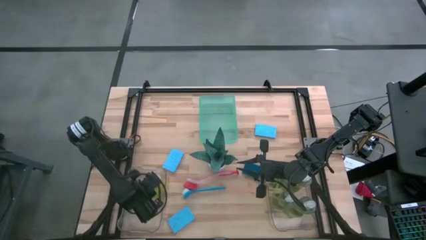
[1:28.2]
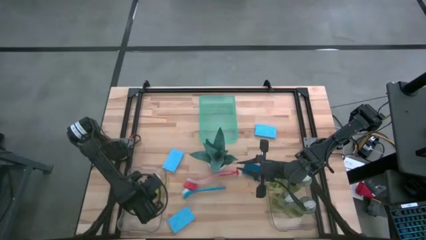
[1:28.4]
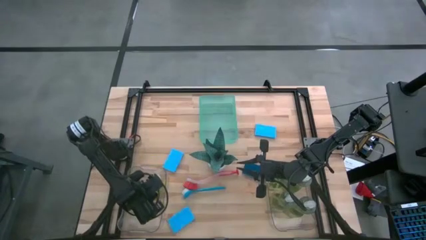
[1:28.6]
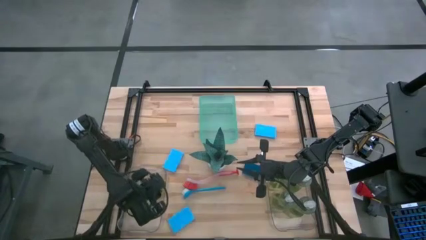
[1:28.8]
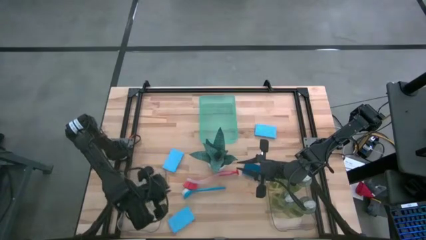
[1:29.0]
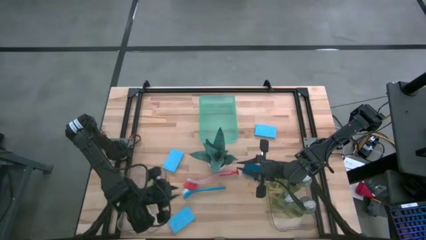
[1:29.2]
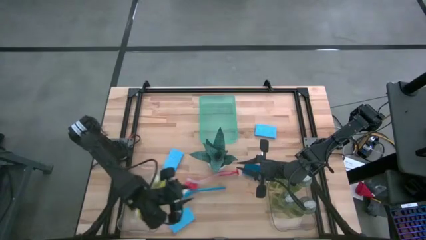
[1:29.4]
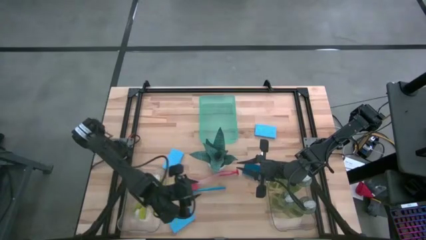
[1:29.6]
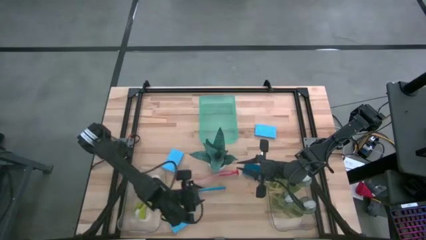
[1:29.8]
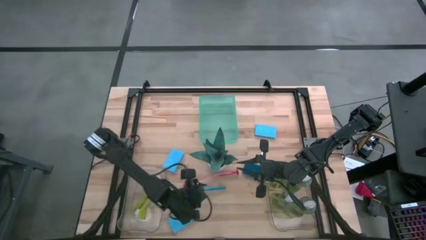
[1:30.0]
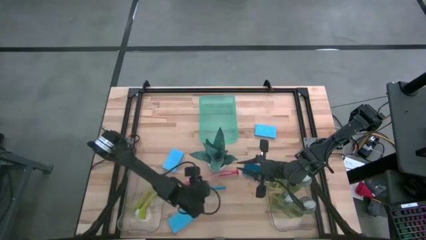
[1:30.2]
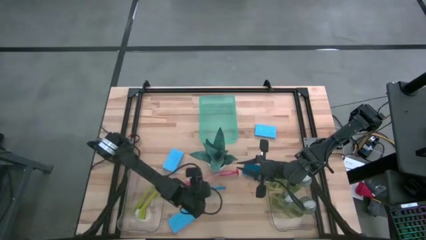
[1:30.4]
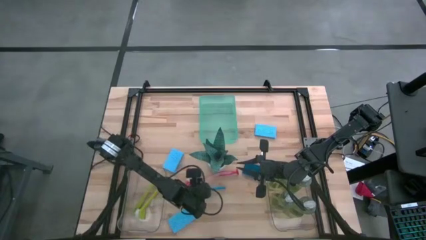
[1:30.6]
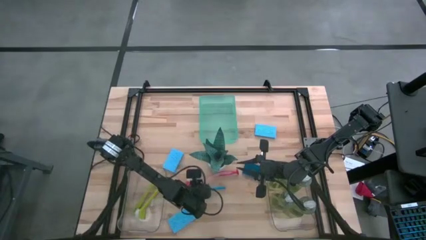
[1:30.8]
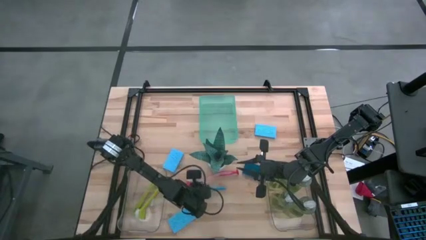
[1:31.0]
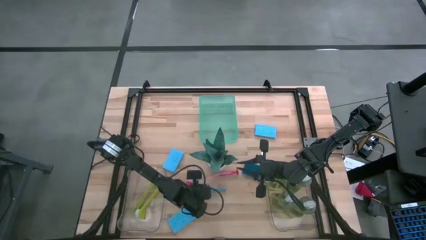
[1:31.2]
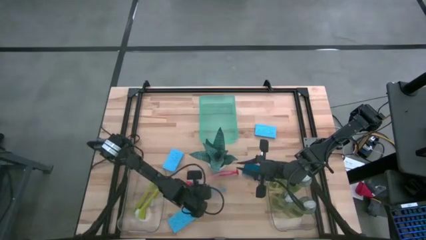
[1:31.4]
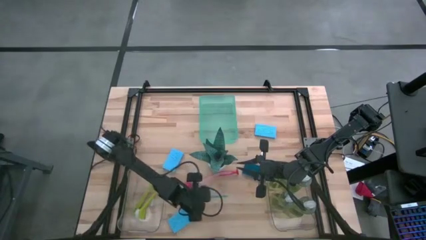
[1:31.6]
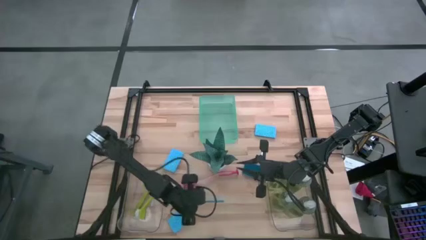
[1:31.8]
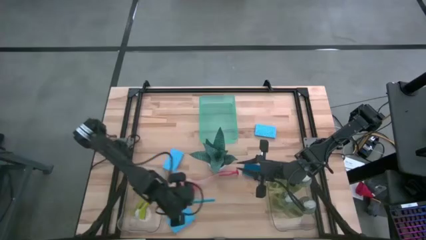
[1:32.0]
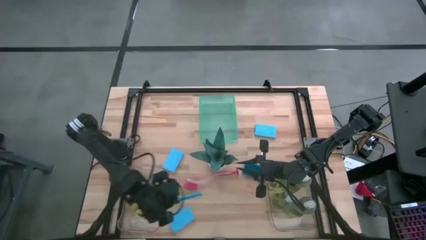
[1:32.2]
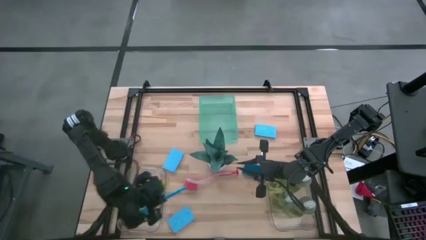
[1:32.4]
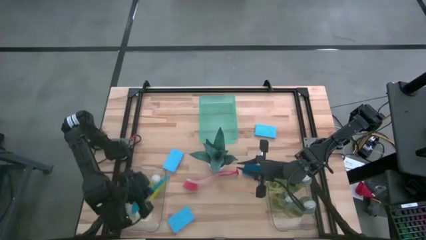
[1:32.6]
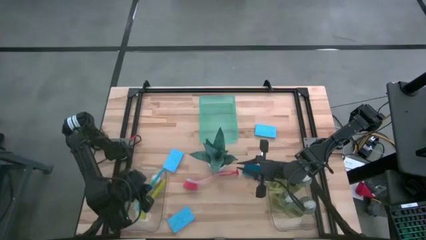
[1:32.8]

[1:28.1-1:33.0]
Task: Pick & Place Kitchen Sink Supplies
Put the blue dish brush into the left transparent bin

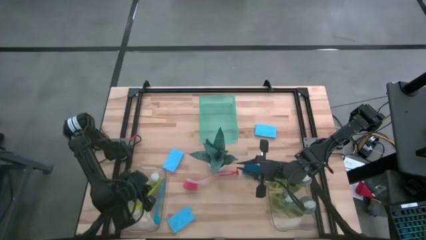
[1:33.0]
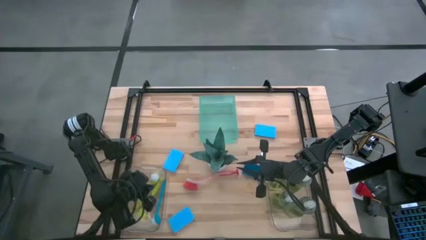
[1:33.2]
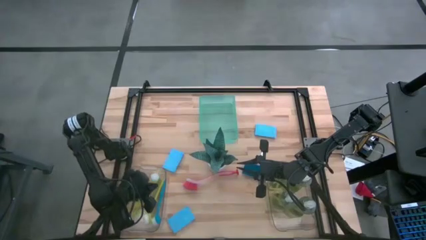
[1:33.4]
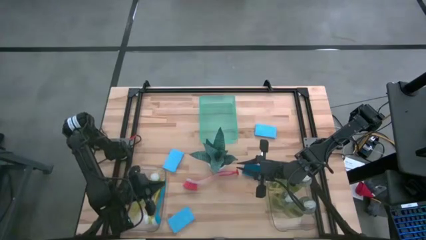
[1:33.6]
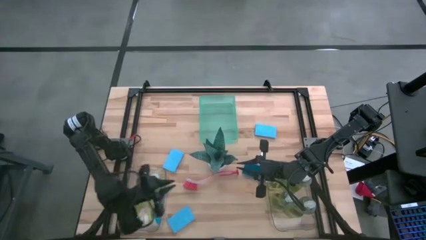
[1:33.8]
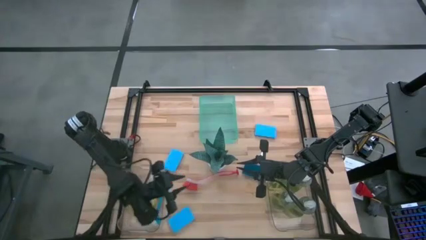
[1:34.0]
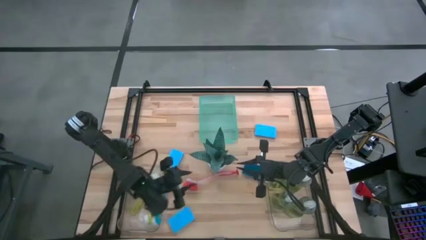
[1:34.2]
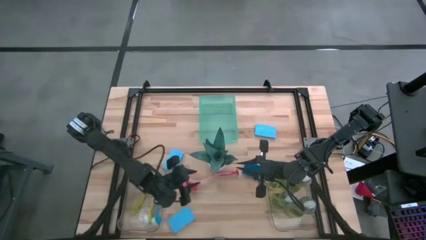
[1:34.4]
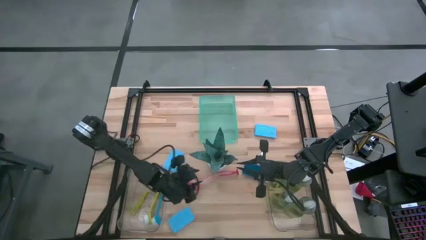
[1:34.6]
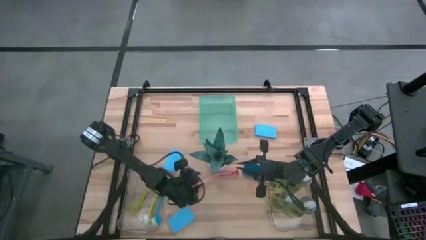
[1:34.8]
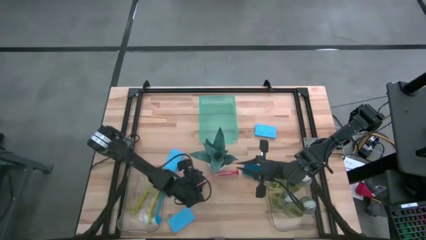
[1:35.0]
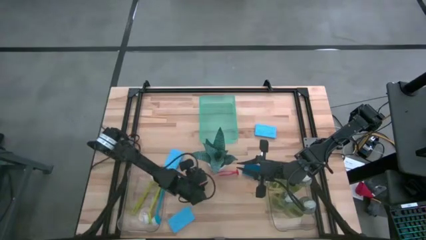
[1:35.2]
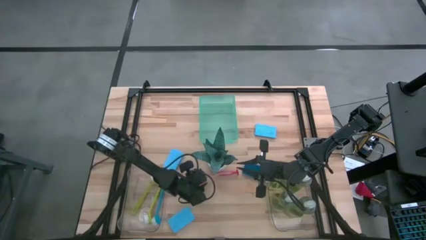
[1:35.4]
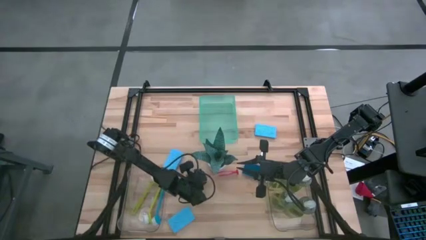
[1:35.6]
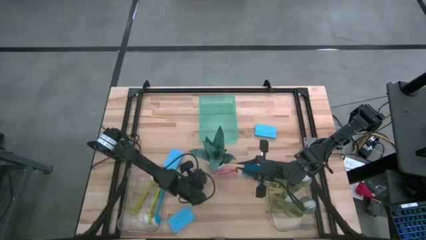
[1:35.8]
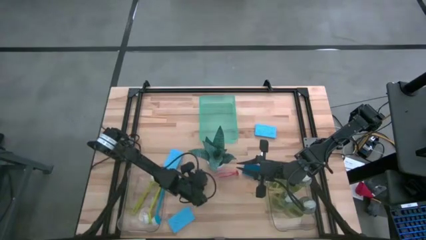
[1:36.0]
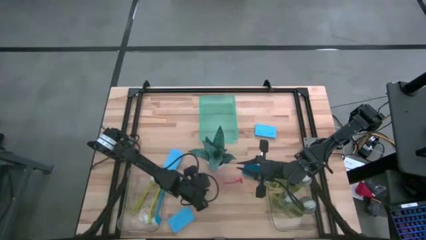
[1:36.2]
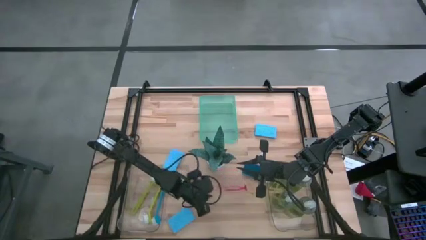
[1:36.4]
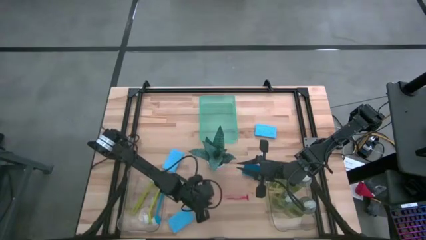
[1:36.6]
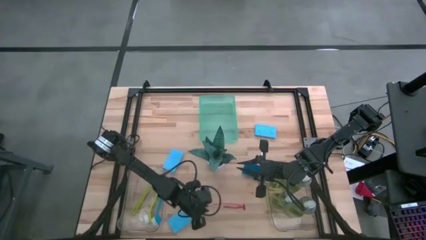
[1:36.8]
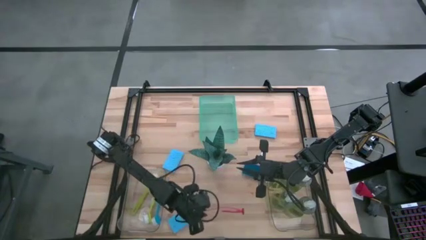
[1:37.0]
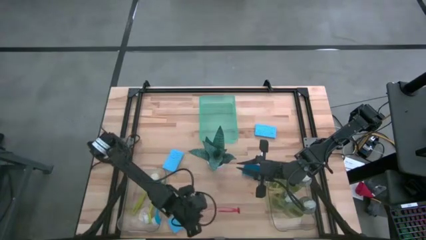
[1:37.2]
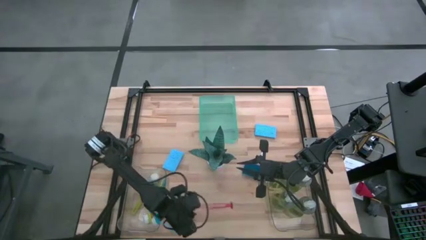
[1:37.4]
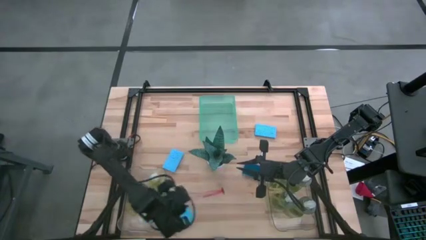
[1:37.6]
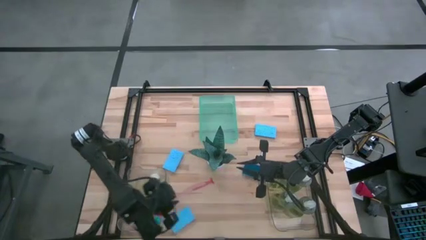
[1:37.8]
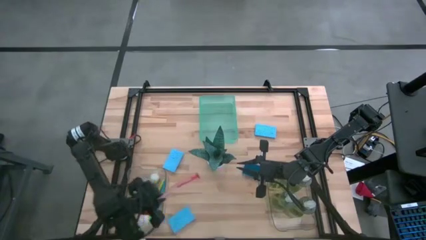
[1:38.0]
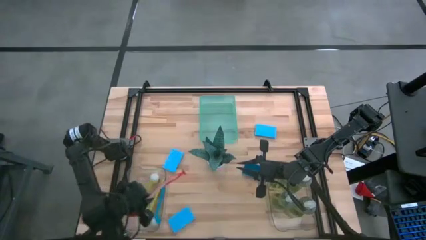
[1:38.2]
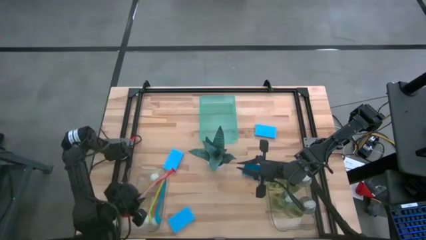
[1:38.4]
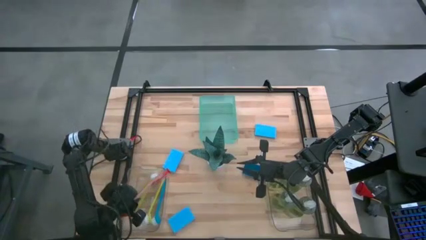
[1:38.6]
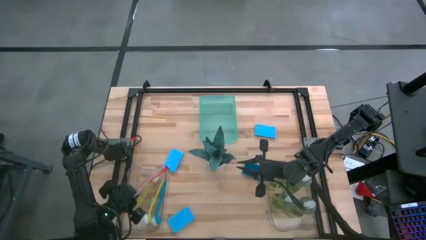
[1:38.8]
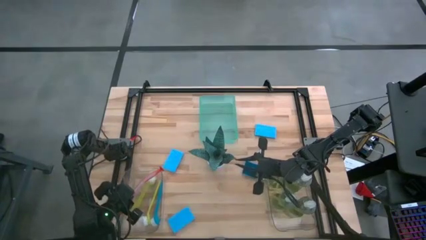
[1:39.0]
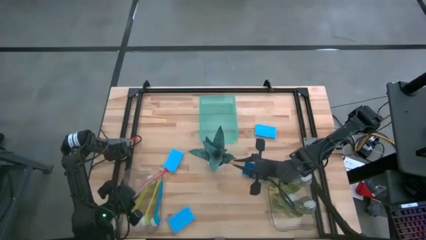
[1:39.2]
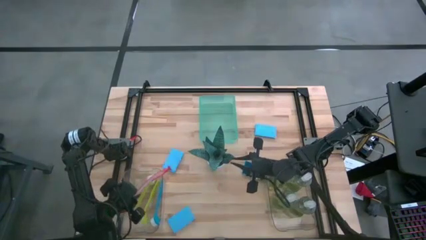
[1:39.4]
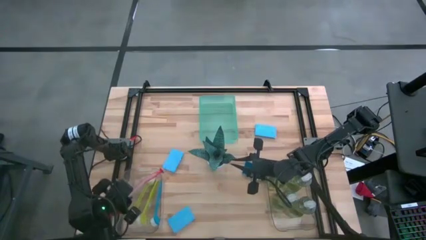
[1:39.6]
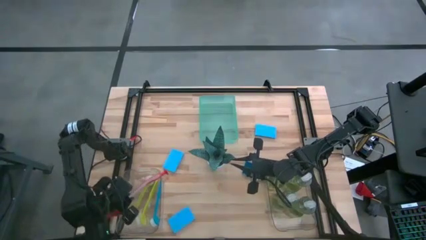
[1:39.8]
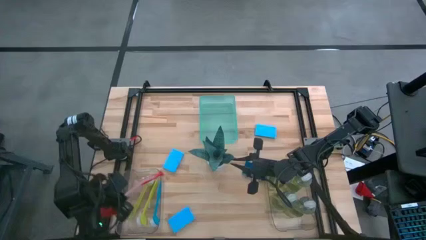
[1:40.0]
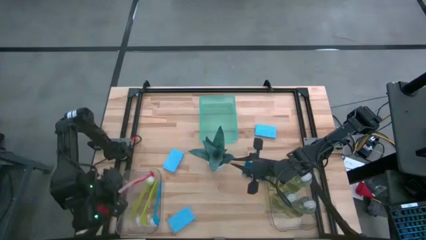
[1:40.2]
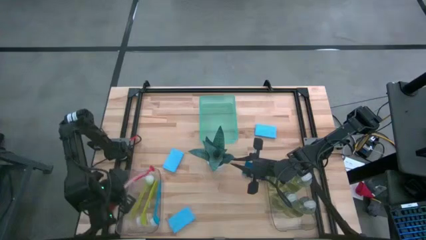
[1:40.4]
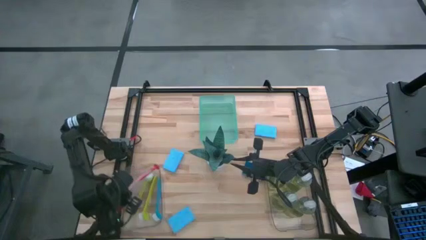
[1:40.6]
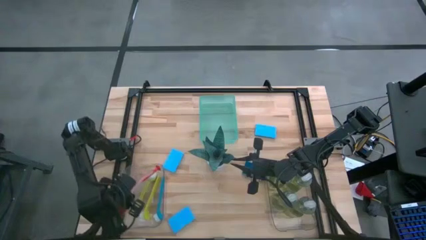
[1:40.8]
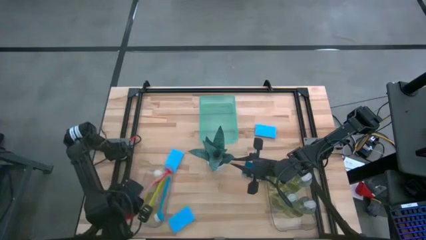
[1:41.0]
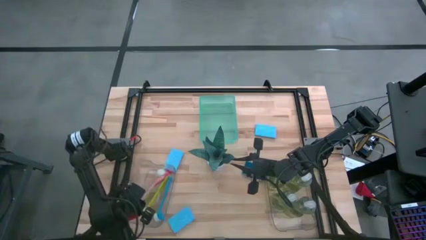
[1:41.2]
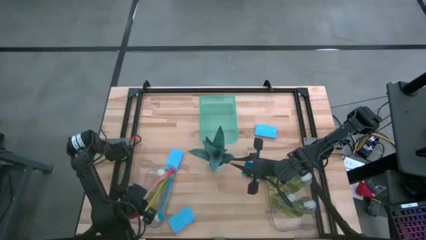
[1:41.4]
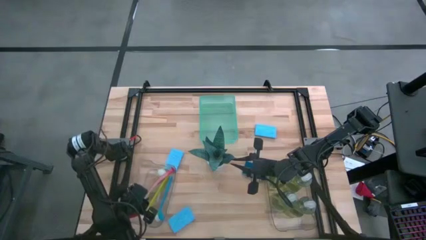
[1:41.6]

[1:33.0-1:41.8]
Put the red dish brush into the left transparent bin

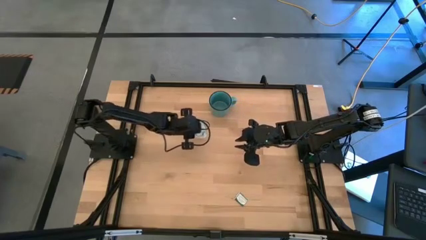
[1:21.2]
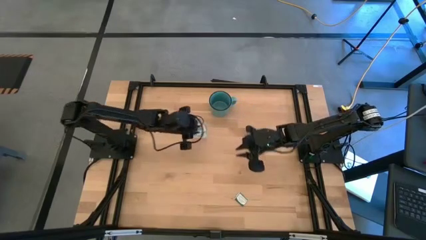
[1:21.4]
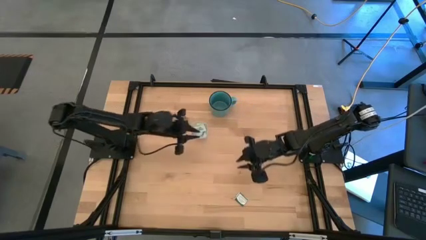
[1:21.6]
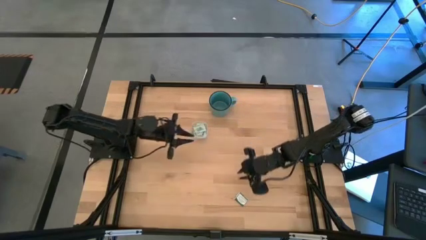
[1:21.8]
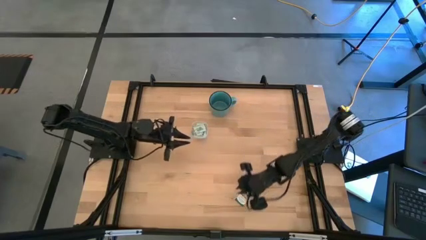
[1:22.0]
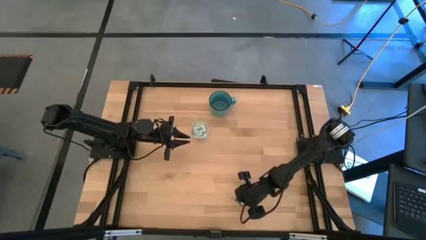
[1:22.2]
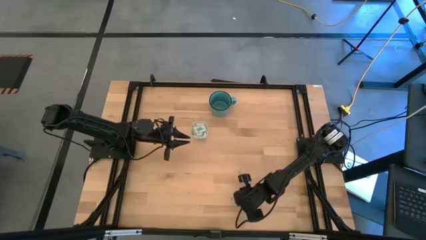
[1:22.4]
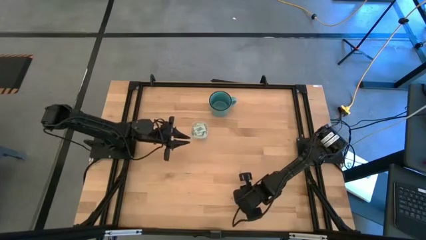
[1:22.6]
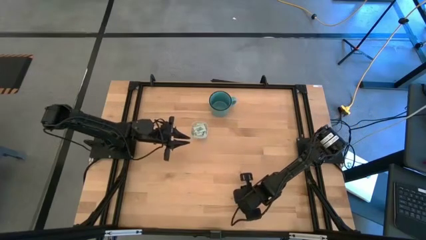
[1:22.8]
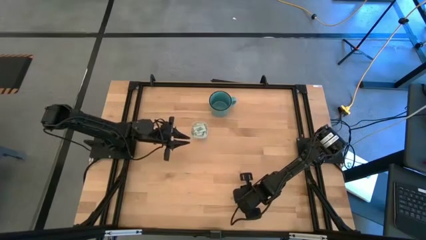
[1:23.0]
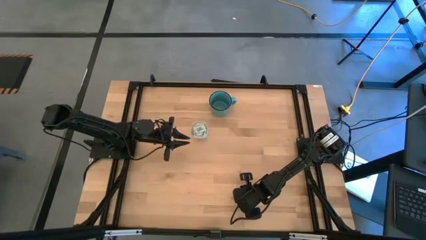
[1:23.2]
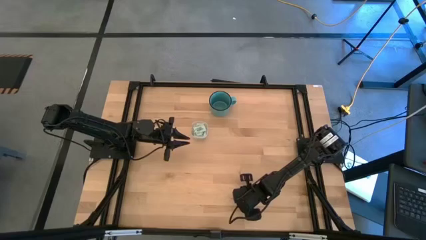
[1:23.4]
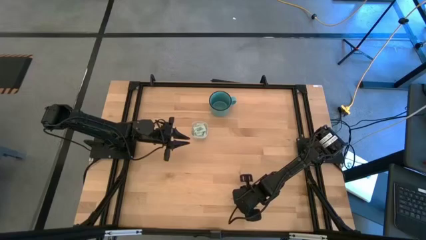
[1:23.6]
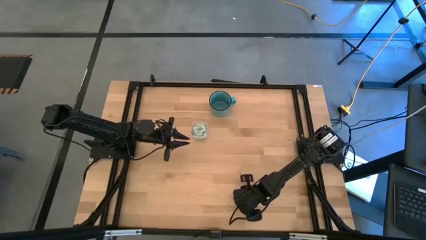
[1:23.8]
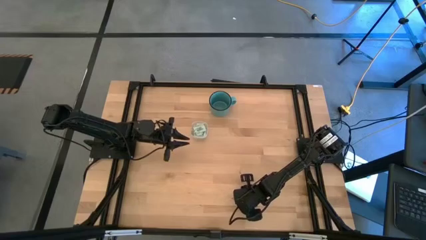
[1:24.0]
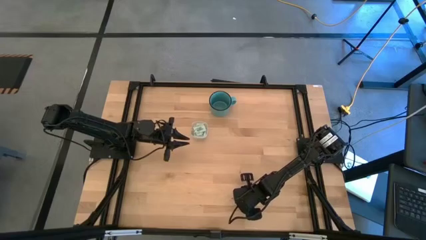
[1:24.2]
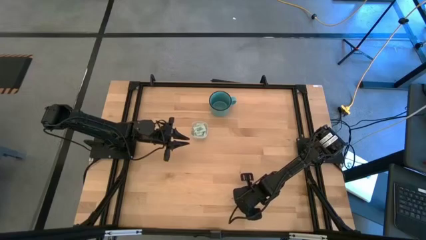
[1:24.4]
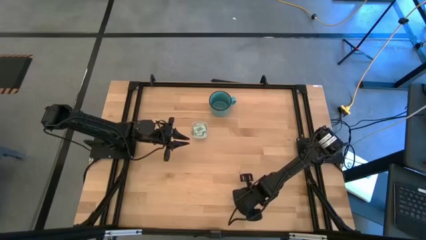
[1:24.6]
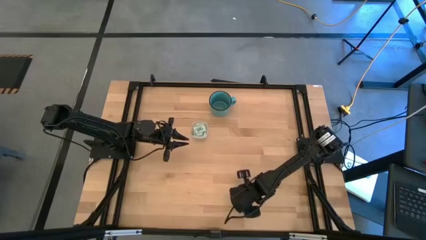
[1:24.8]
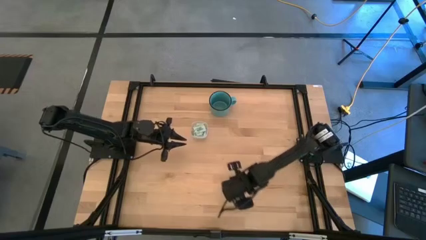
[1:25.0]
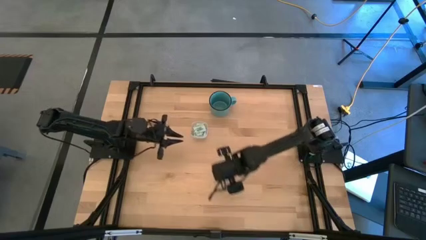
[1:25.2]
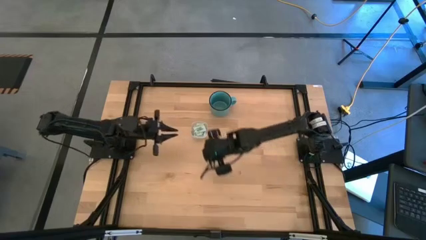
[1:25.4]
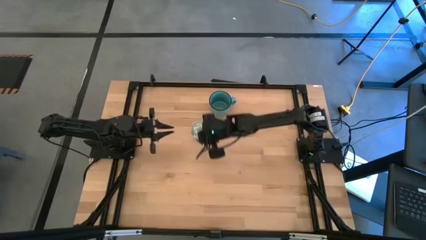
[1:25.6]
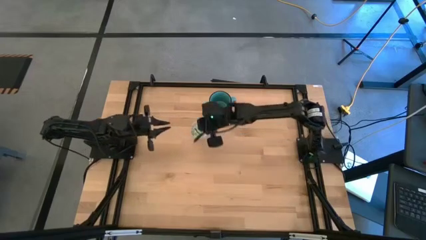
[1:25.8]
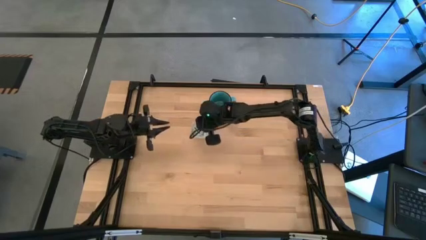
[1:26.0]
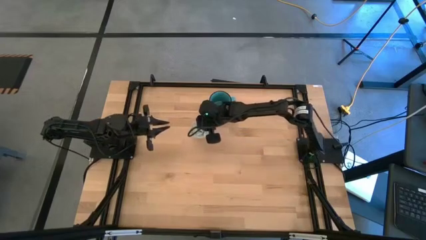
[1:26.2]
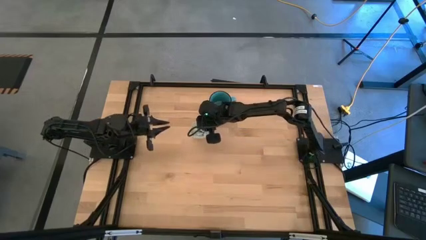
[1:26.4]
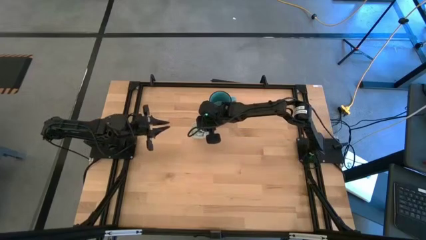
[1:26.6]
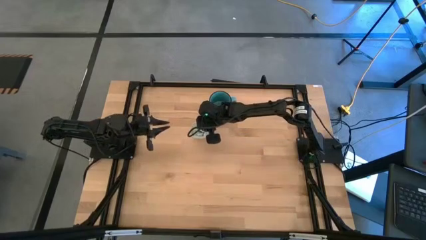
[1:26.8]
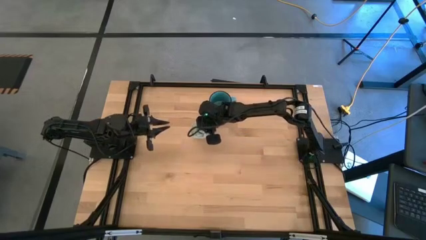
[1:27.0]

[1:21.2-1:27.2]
Task: Pick and place Stevia / Truvia into bins
Put the dark green truvia packet into the transparent container
